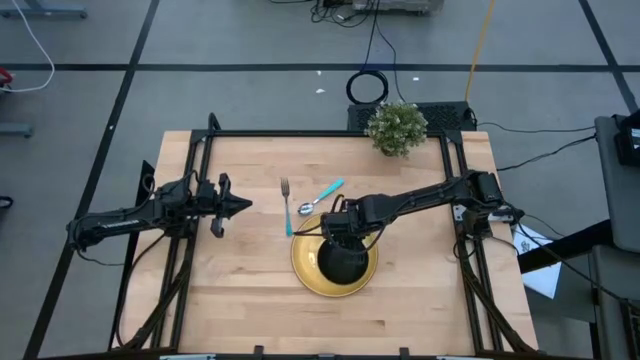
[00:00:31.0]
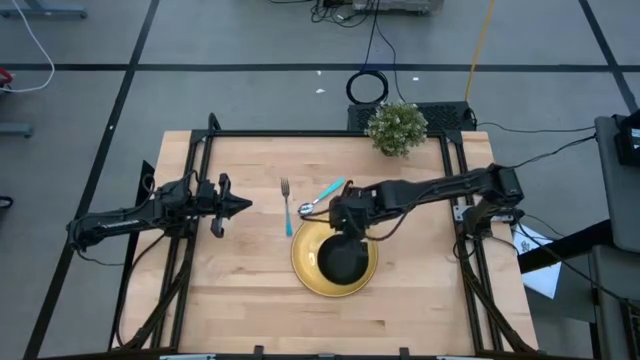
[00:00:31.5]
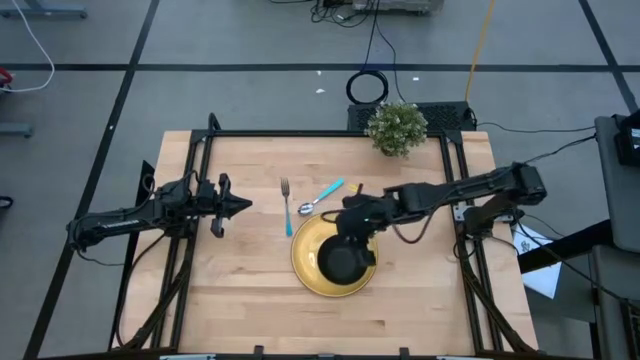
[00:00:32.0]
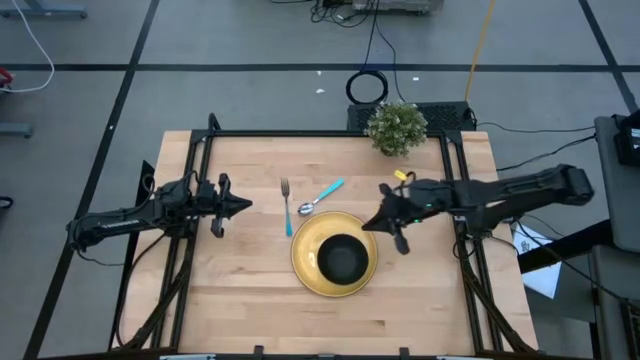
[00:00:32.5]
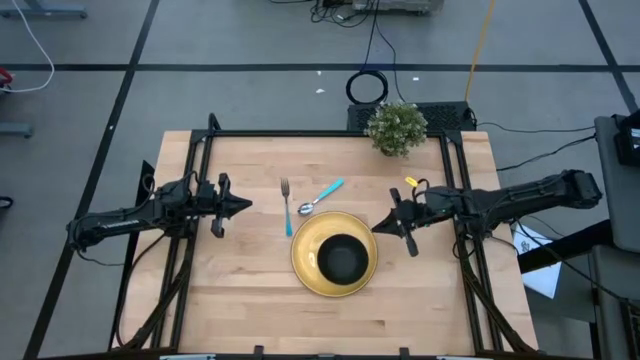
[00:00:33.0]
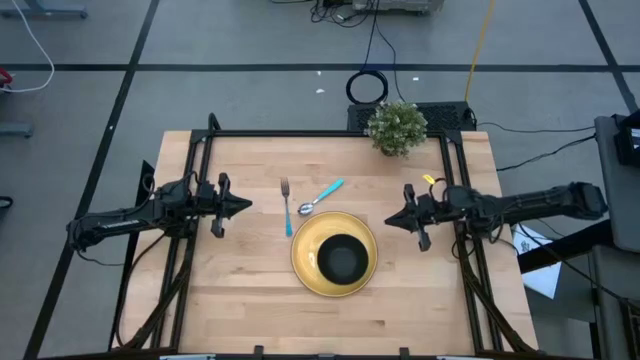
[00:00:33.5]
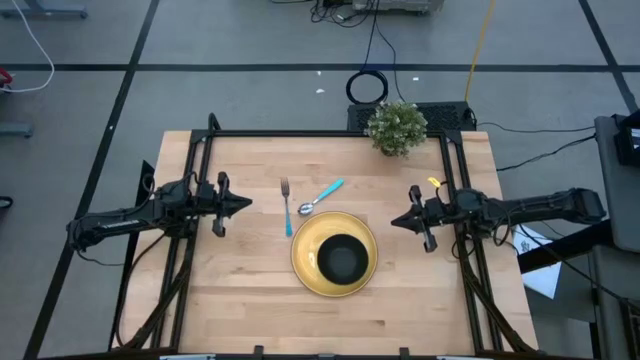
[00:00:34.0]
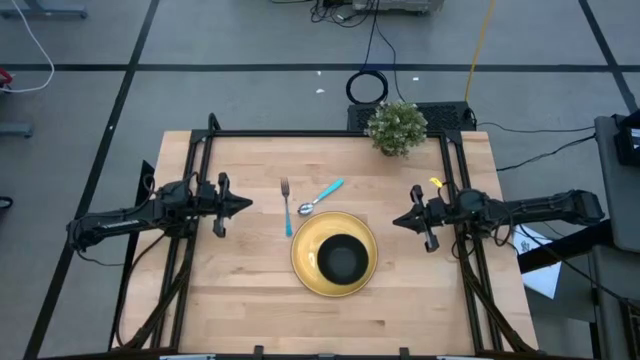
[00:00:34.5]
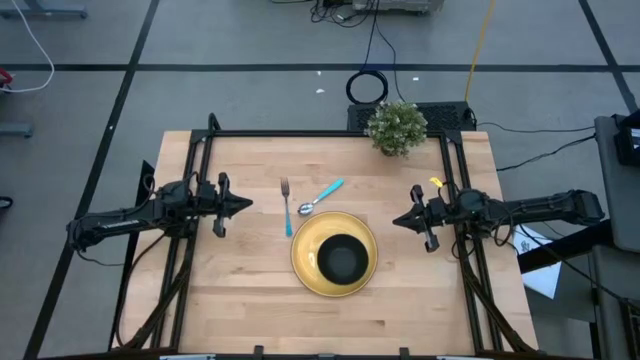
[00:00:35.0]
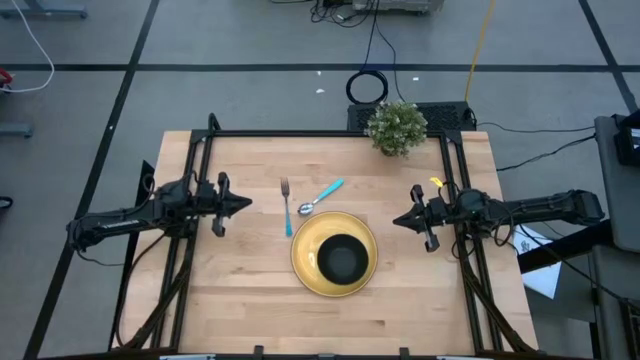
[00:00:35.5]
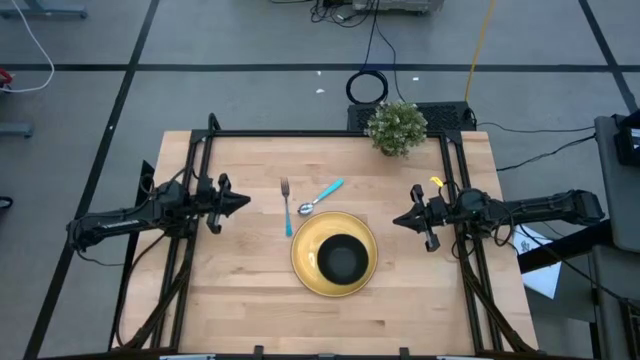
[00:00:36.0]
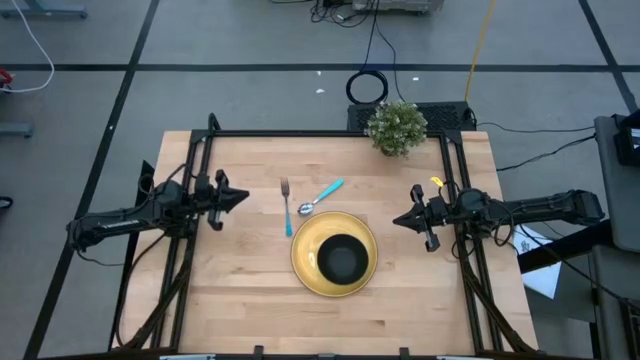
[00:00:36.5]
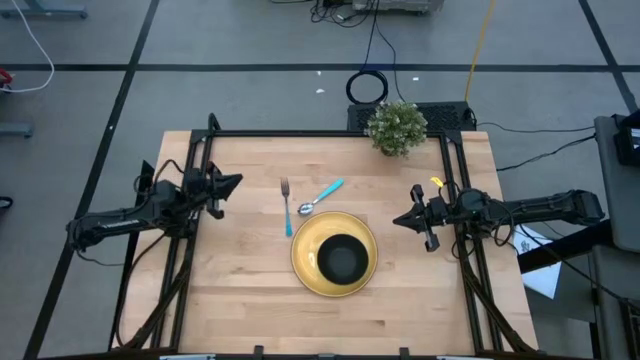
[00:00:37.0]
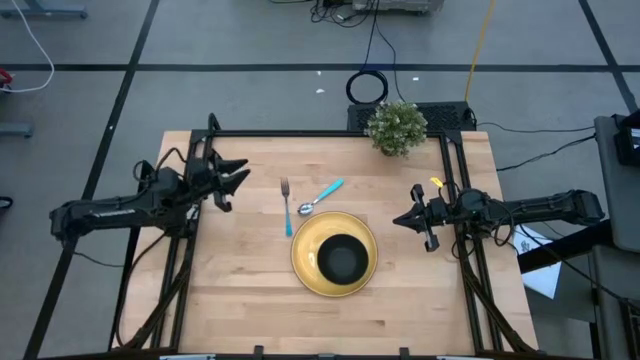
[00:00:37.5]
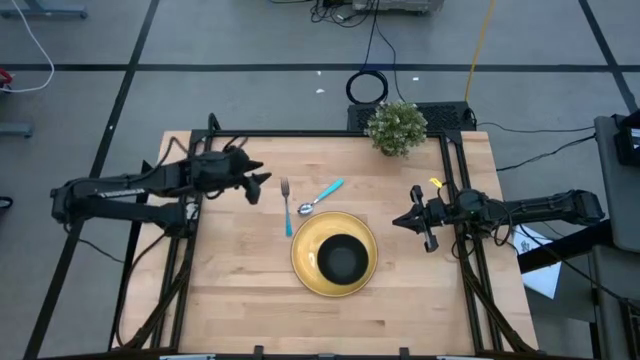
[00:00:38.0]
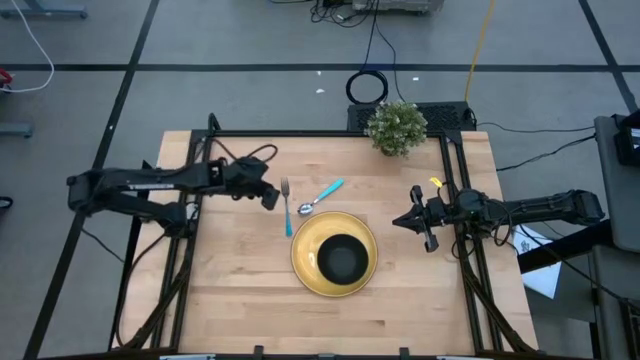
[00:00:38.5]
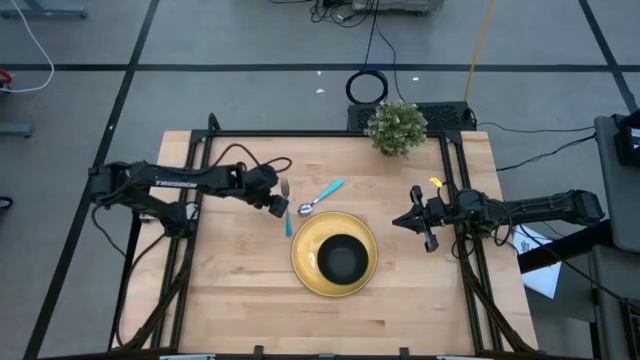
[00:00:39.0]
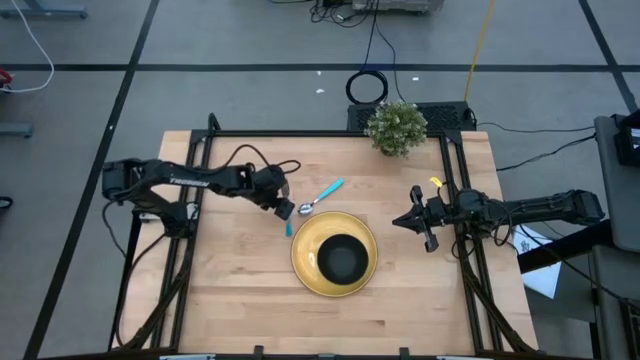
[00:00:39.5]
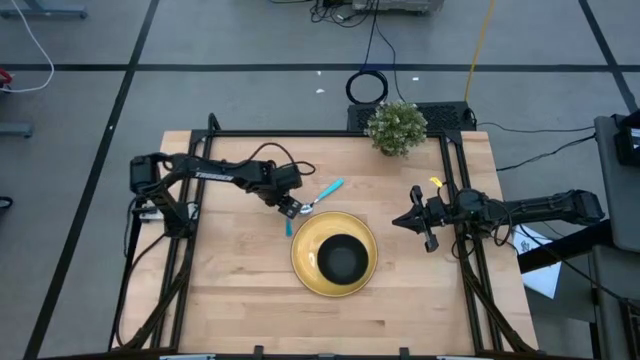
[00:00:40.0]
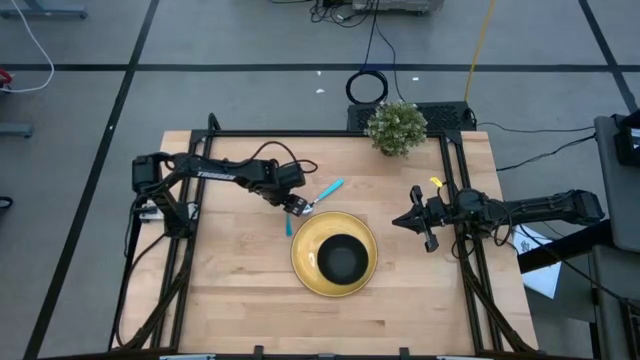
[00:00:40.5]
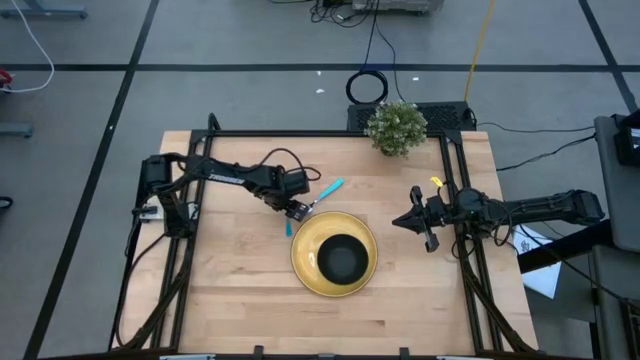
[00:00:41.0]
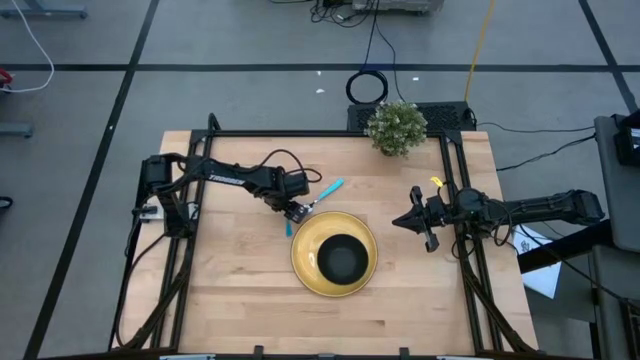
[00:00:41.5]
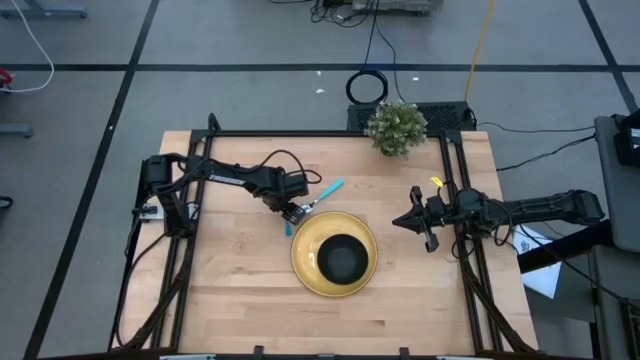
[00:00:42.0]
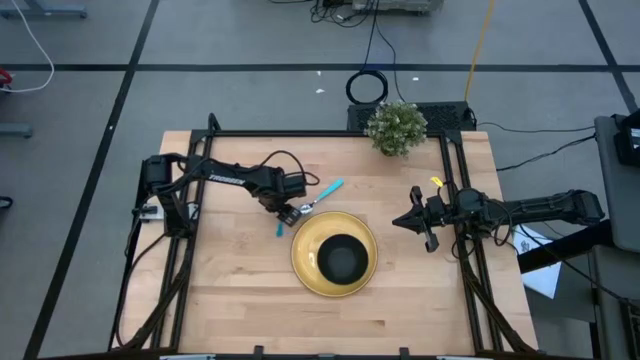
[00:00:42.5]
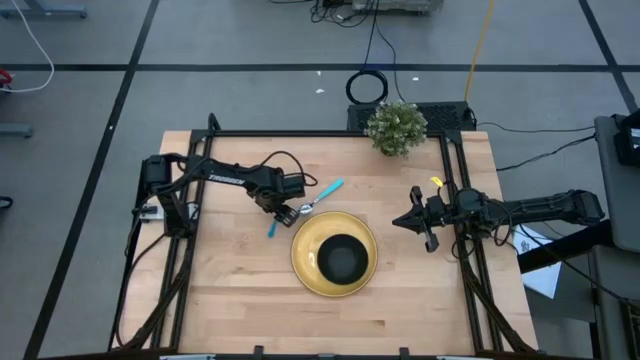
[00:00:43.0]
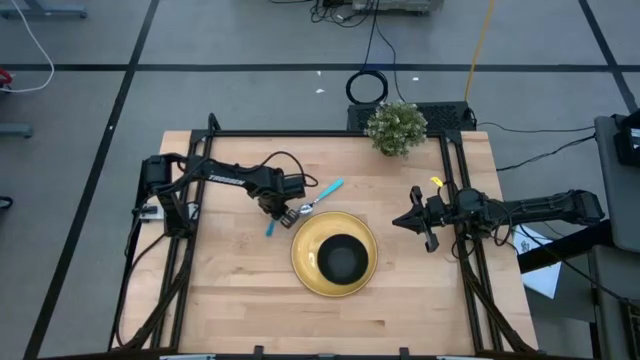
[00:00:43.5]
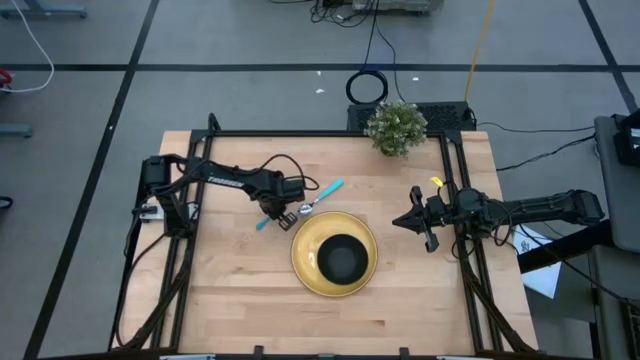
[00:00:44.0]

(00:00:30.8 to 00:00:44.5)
Task: Set table place
Put the blue fork on top of the yellow plate

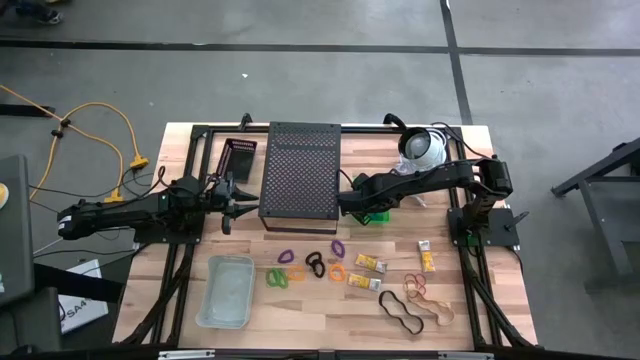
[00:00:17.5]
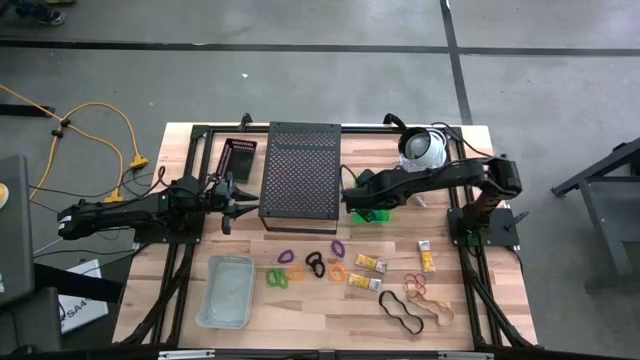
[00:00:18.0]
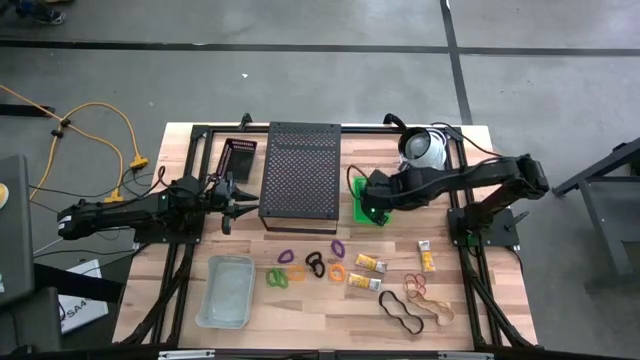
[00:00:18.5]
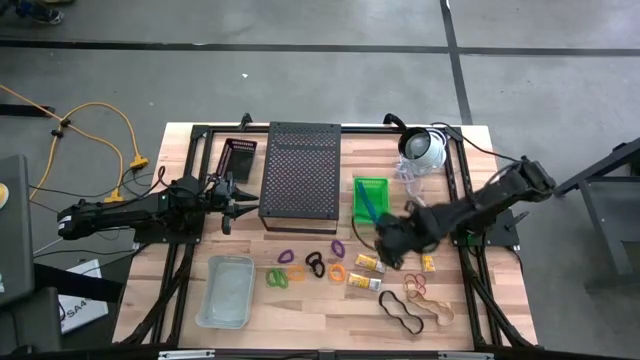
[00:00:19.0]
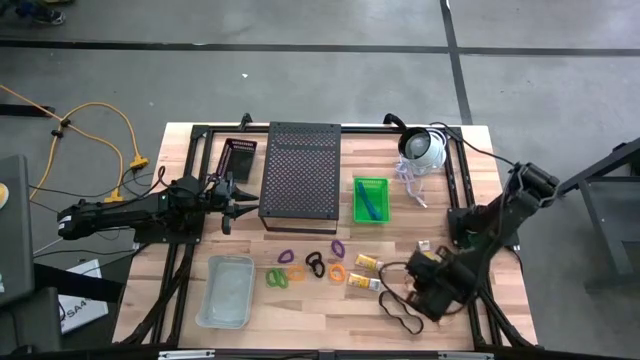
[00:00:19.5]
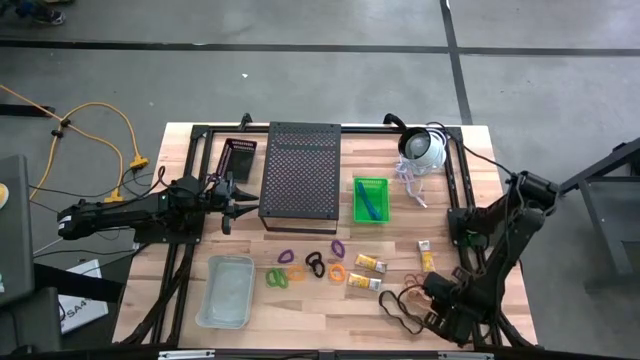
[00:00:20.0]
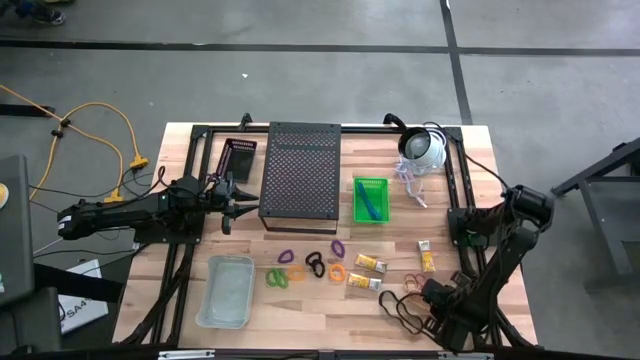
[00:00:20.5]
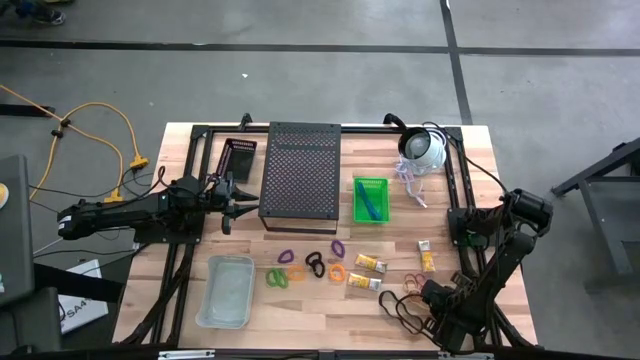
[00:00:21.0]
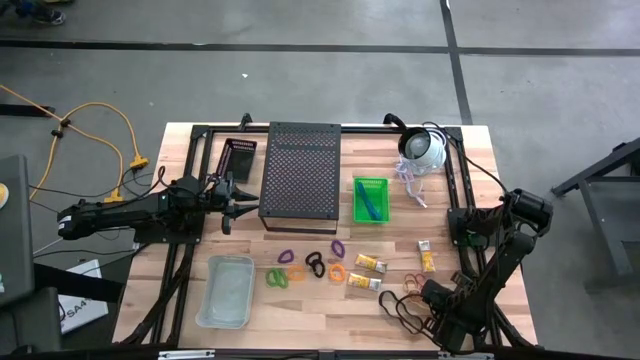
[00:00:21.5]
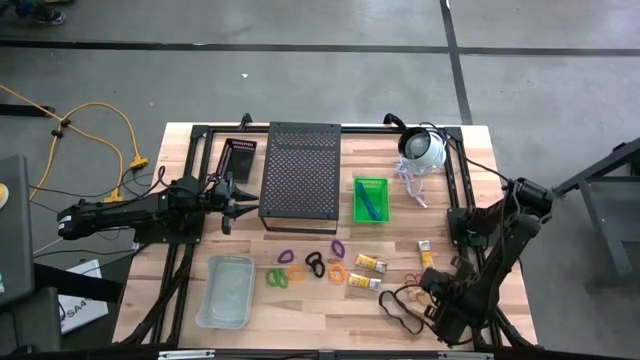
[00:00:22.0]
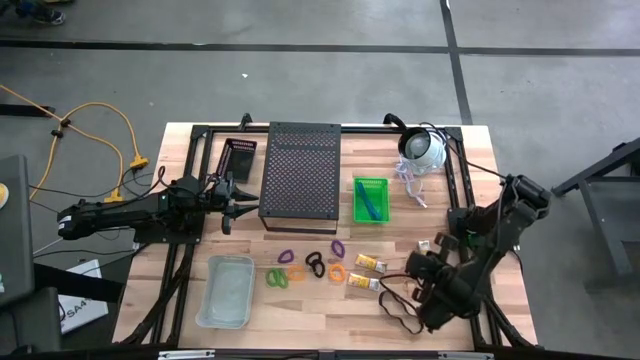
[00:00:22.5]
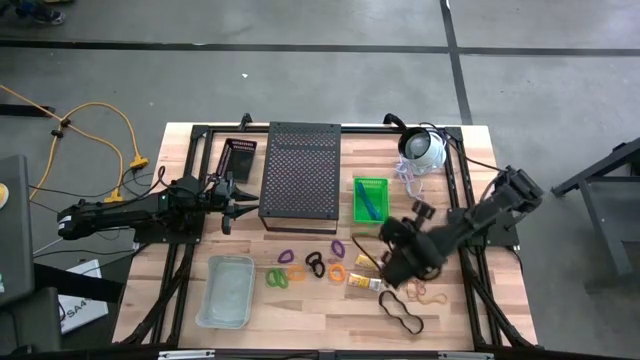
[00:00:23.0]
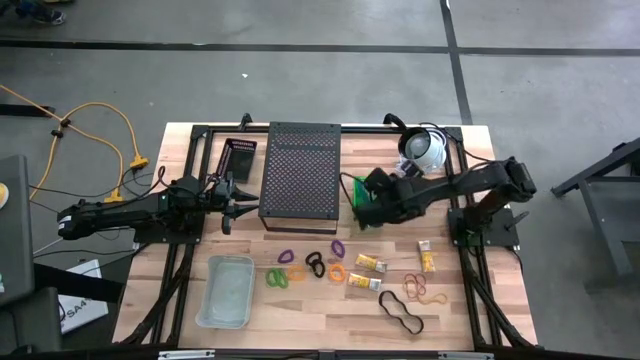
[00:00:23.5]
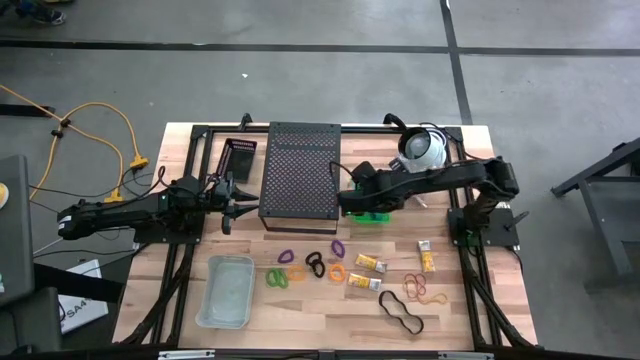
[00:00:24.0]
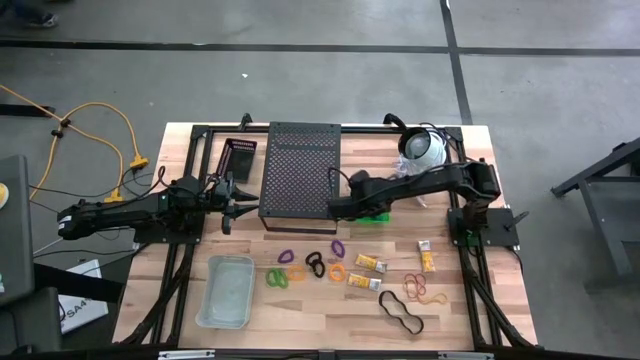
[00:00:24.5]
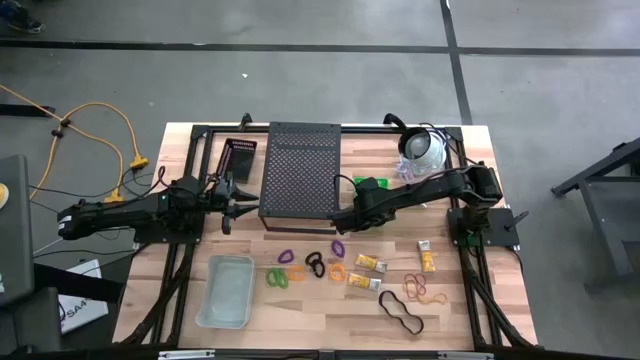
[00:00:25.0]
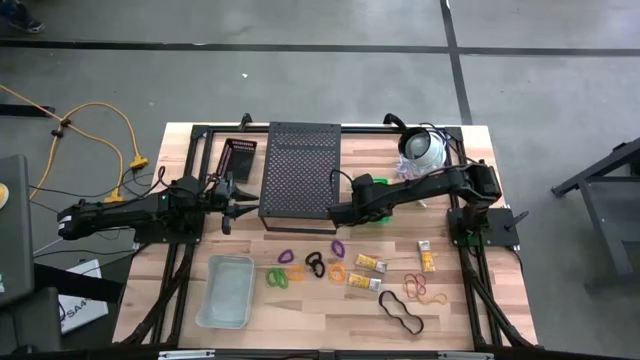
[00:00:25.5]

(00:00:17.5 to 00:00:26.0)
Task: Pick & Place Office Desk Supplies
Put the brown rubber band into the green basket
